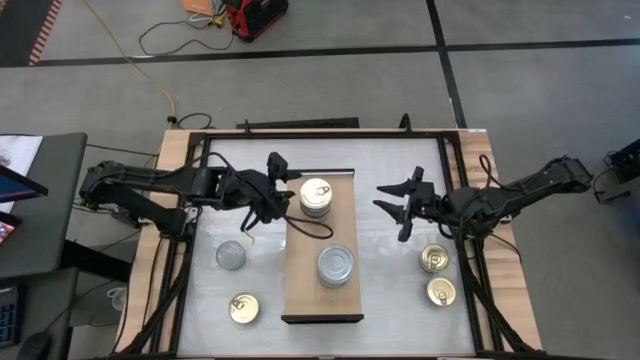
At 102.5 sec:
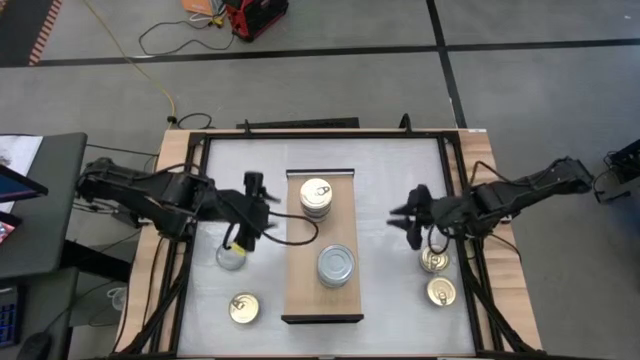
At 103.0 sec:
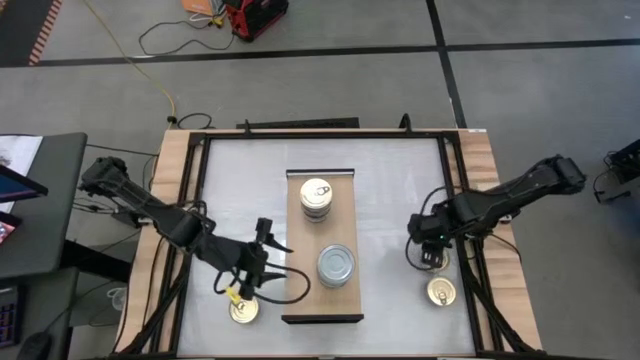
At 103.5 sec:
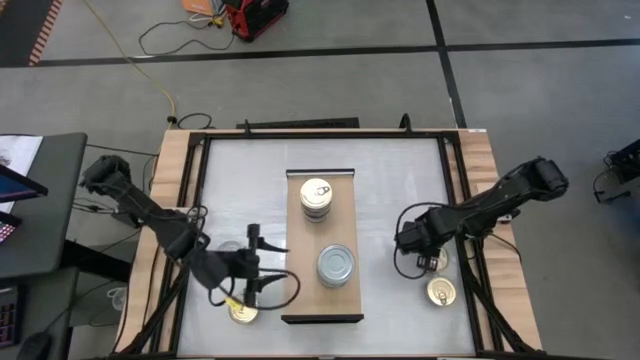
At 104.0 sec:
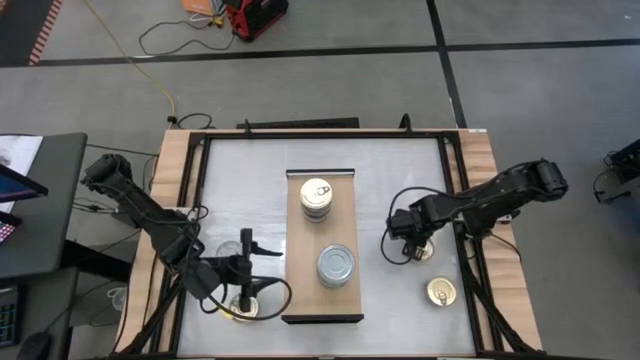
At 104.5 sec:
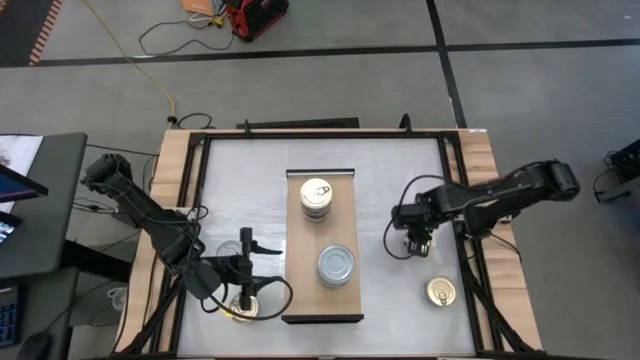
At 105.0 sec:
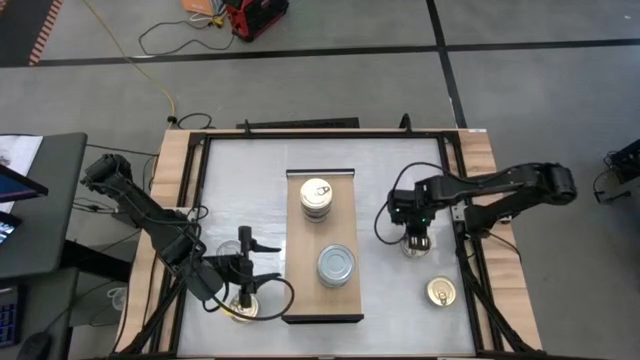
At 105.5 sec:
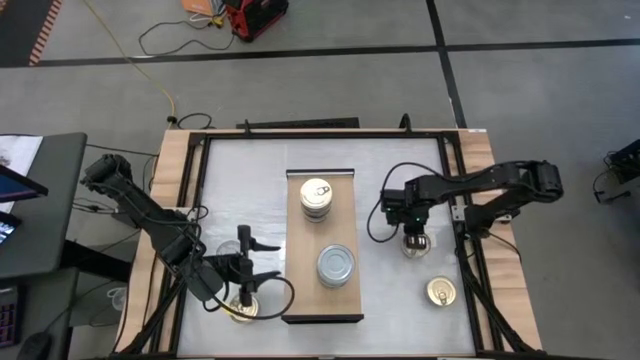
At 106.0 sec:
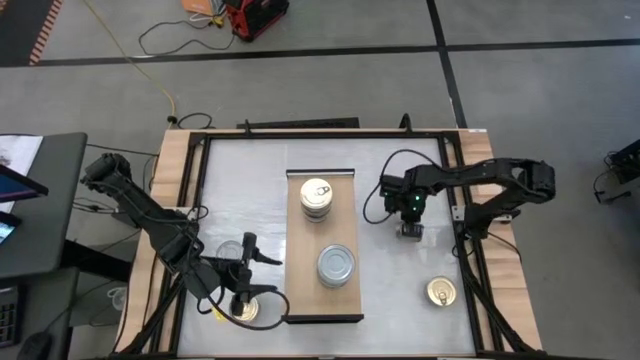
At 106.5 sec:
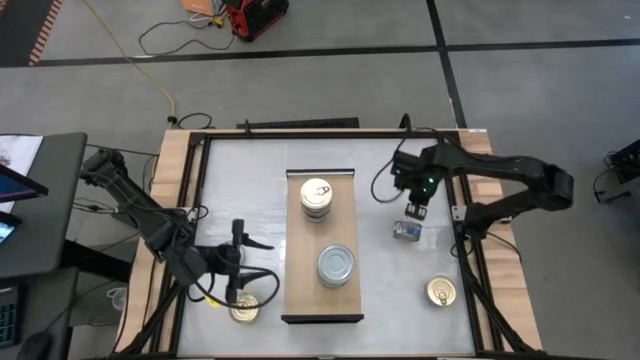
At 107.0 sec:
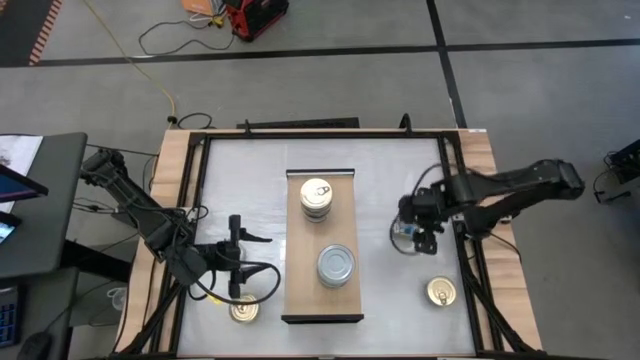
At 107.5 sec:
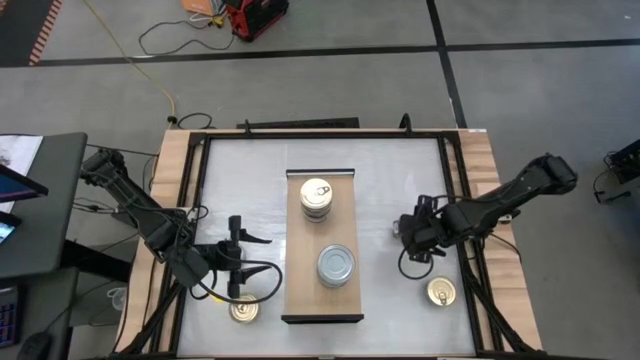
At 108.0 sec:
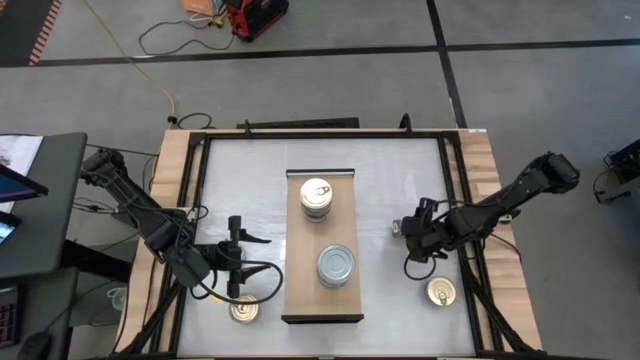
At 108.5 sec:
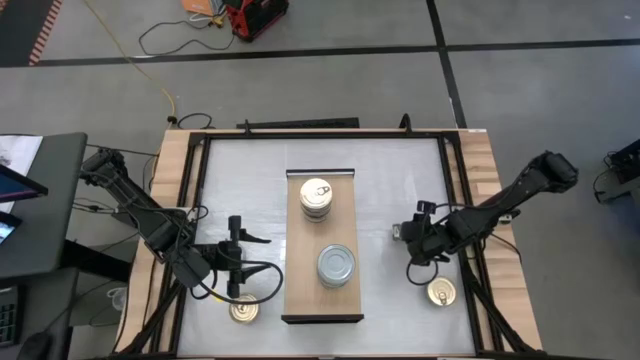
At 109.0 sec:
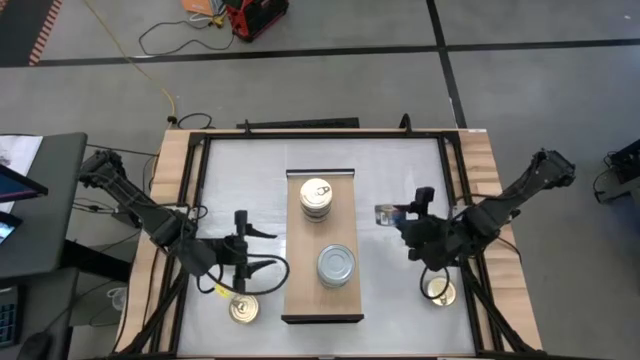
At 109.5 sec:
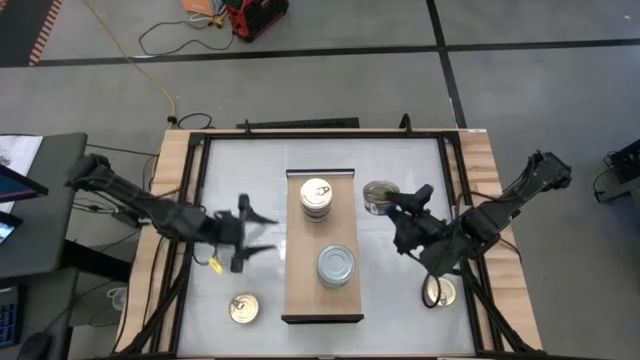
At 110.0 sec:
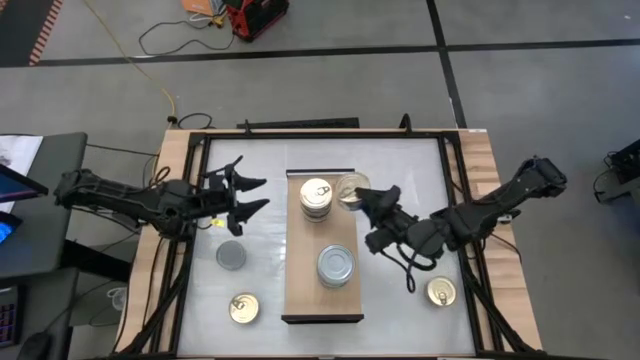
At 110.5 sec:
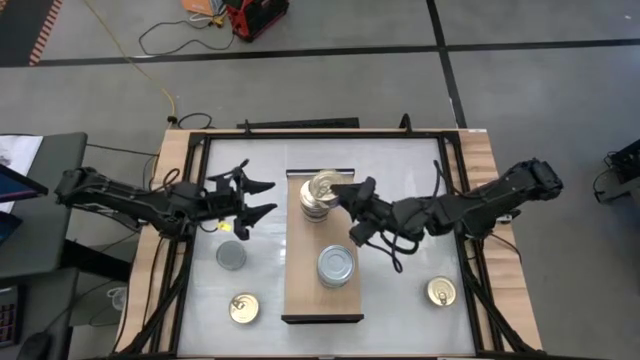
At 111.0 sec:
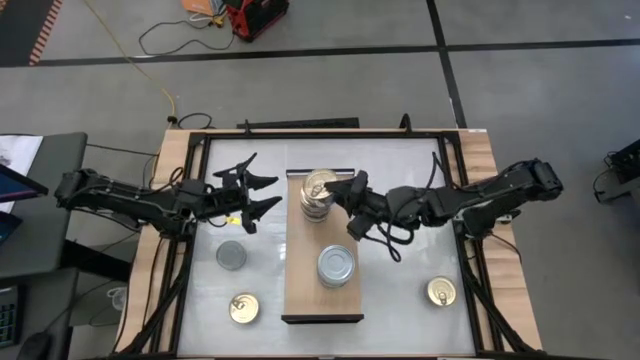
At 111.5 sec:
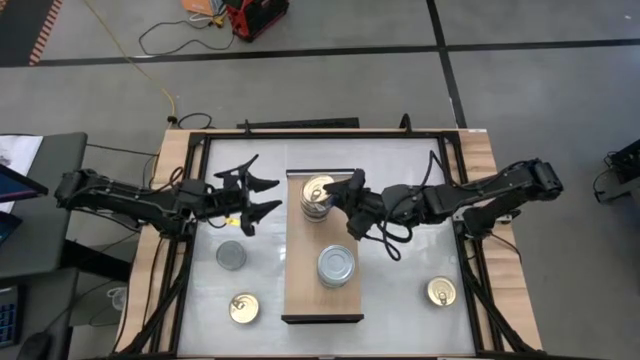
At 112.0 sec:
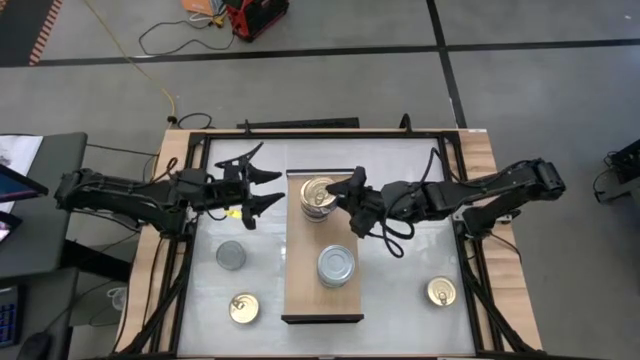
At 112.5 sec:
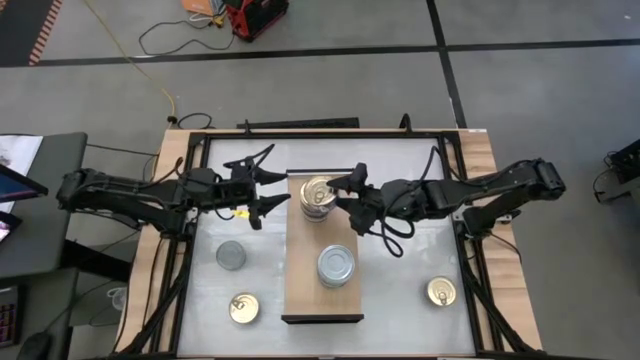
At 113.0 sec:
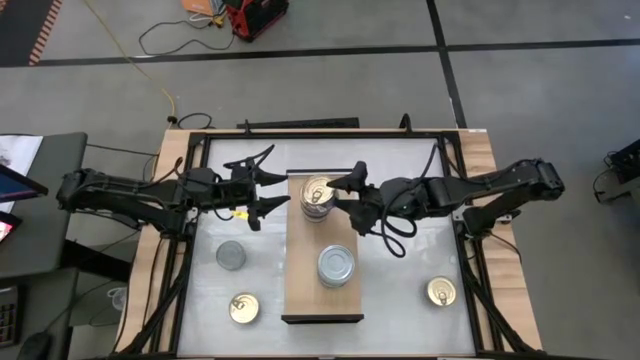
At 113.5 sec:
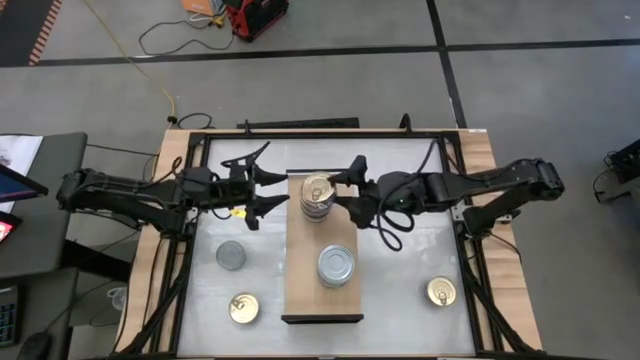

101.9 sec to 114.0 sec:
Task: Stack canned seafood by type on shelf
Stack the blue tuna can on top of the stacked blue tuna cans on the shelf

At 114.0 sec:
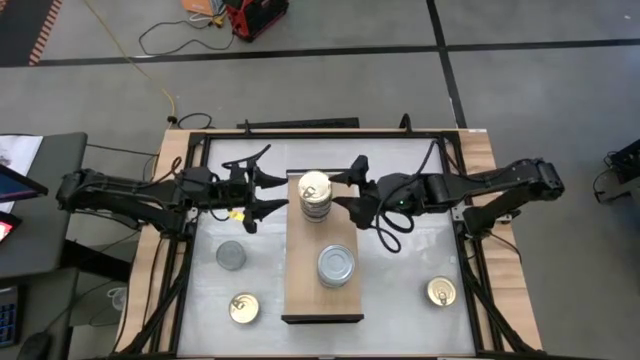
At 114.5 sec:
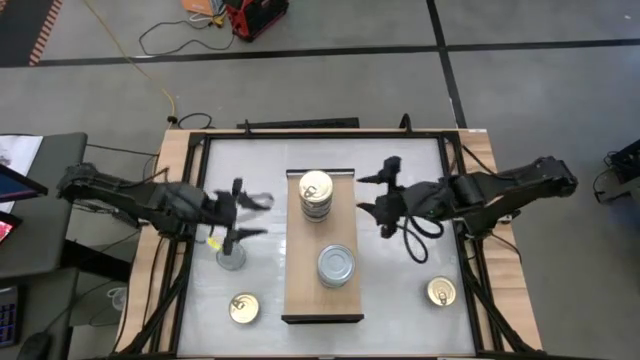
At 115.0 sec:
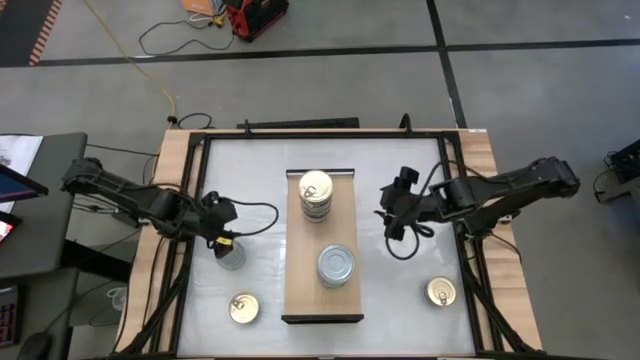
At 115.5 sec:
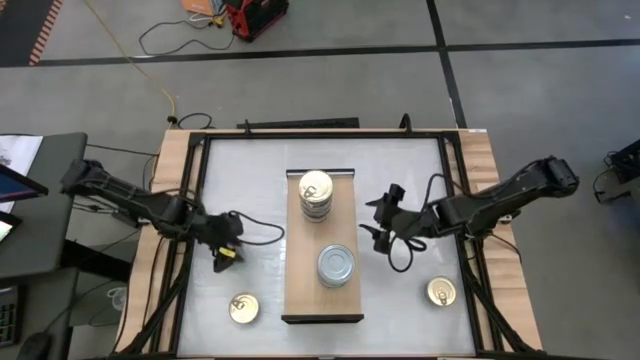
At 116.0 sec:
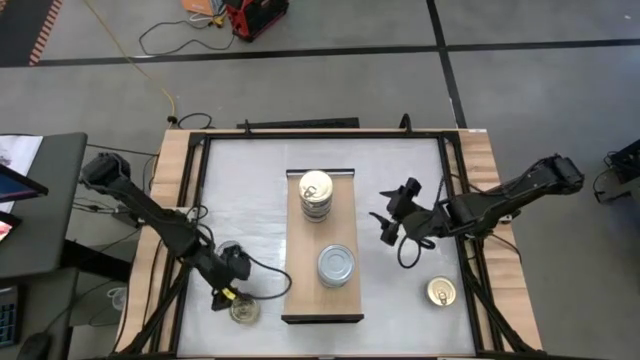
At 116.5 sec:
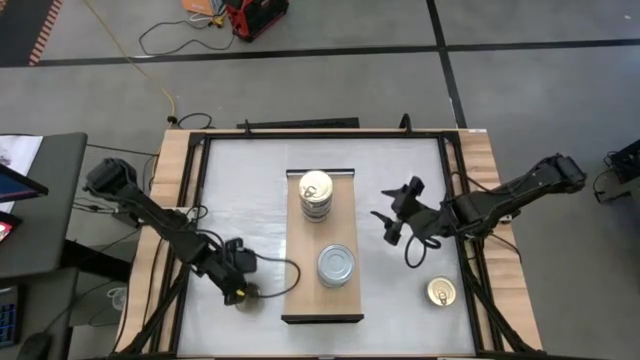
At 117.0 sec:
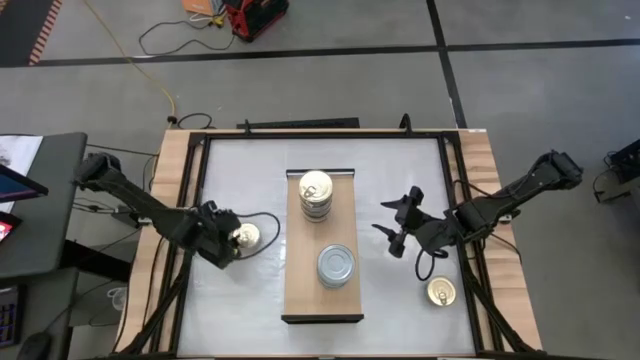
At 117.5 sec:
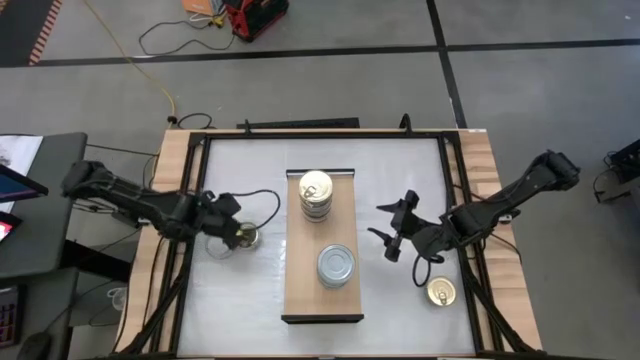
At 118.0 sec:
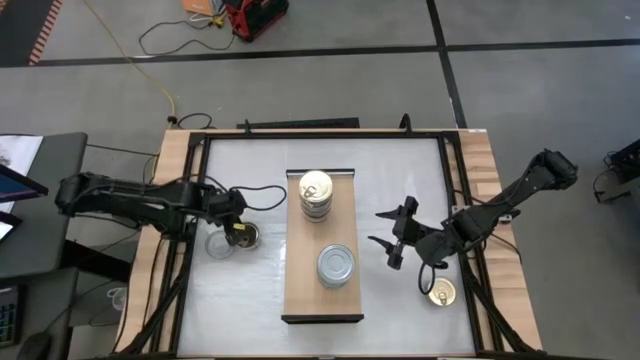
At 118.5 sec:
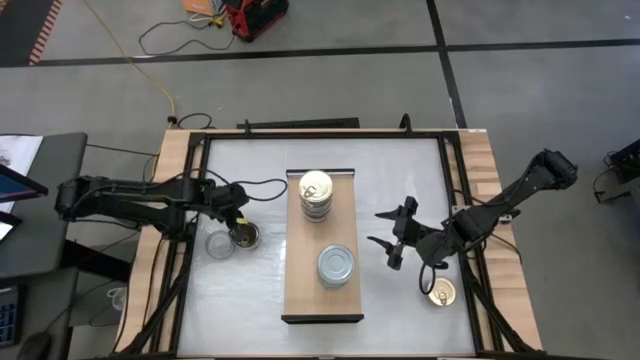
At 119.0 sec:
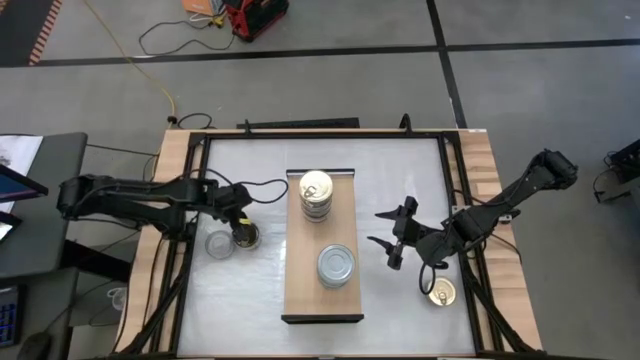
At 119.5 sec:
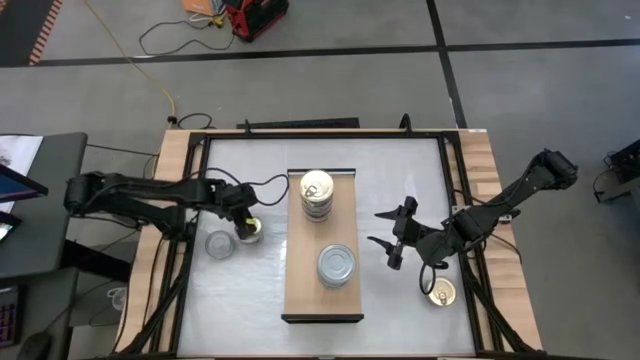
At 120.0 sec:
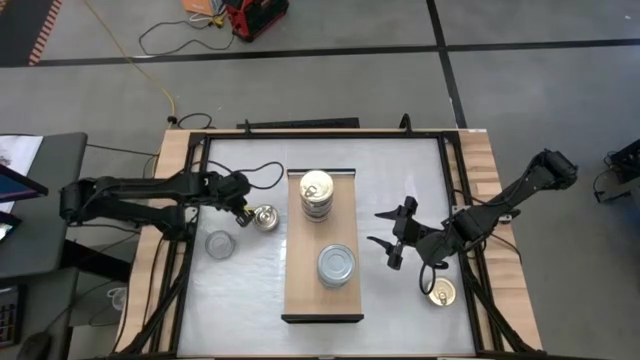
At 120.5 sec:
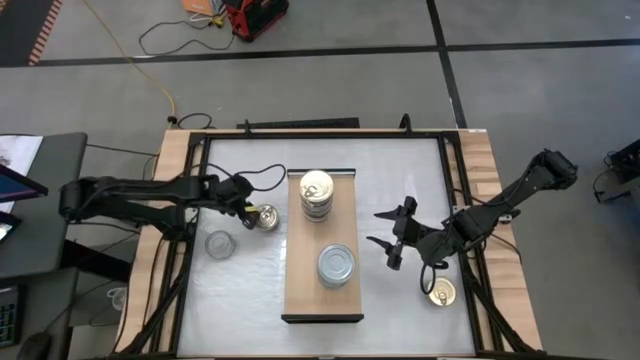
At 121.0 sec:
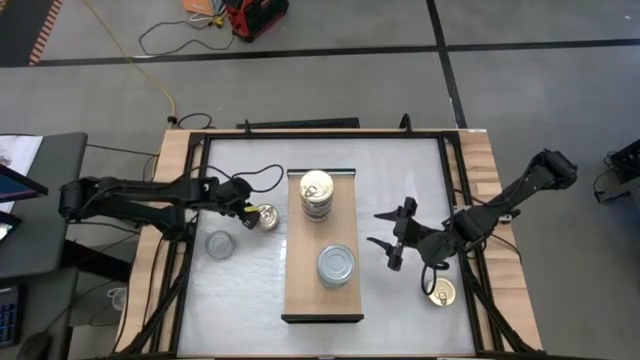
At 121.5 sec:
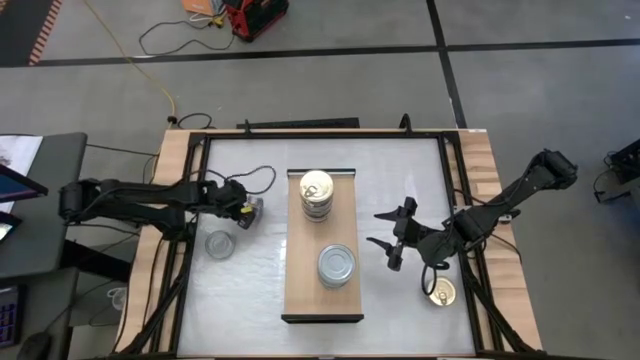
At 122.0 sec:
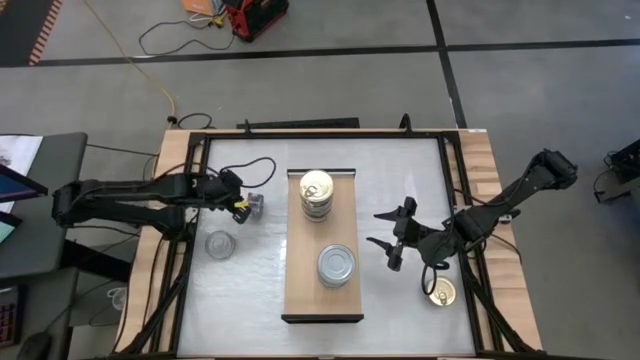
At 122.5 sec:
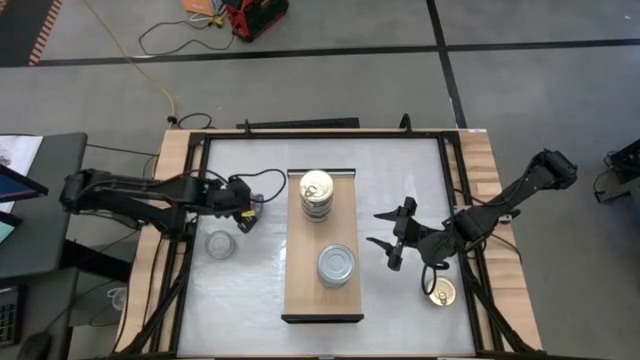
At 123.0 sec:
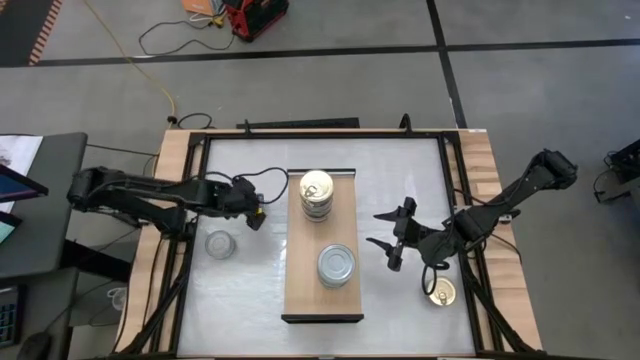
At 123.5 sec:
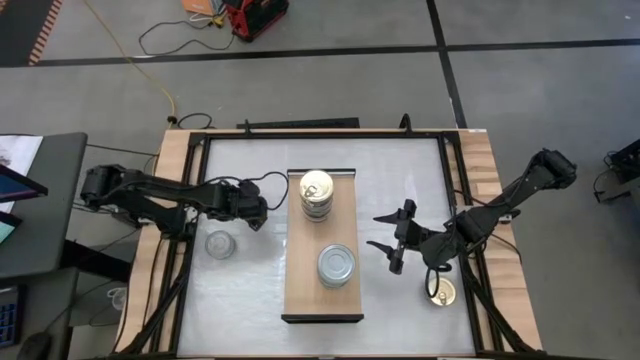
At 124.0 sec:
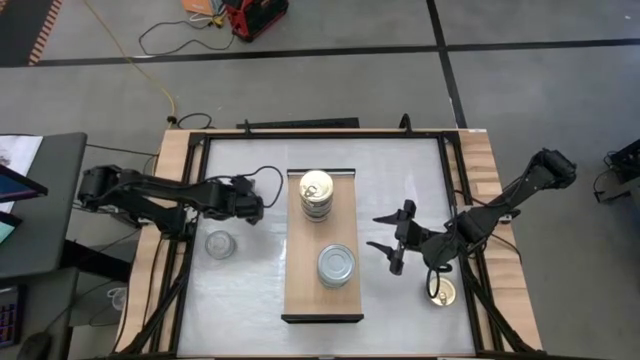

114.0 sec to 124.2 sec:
Stack the blue tuna can on top of the stacked blue tuna cans on the shelf
